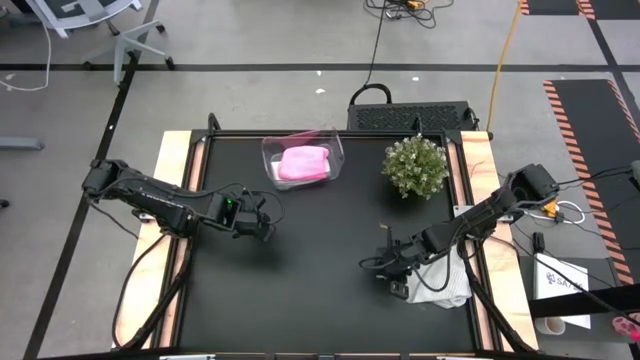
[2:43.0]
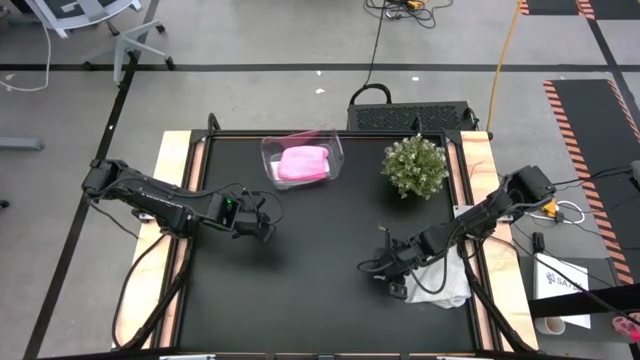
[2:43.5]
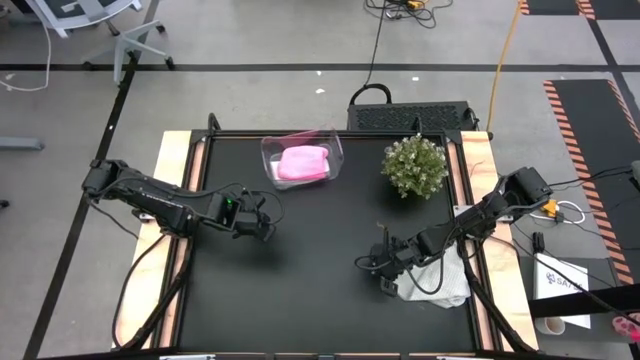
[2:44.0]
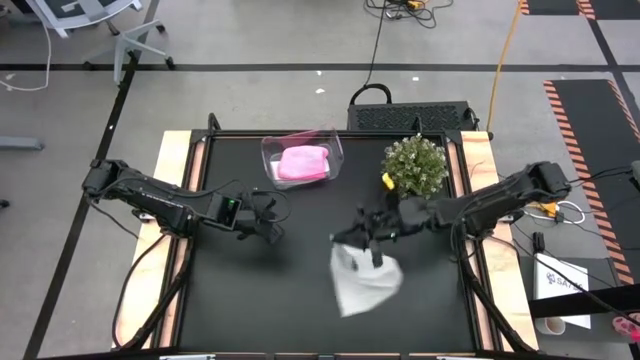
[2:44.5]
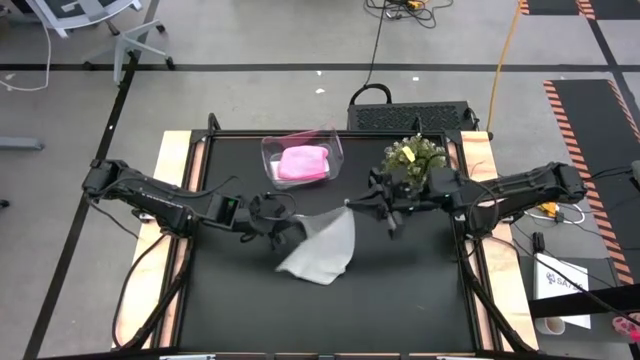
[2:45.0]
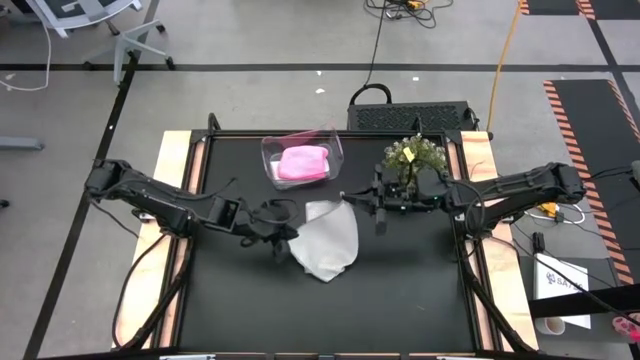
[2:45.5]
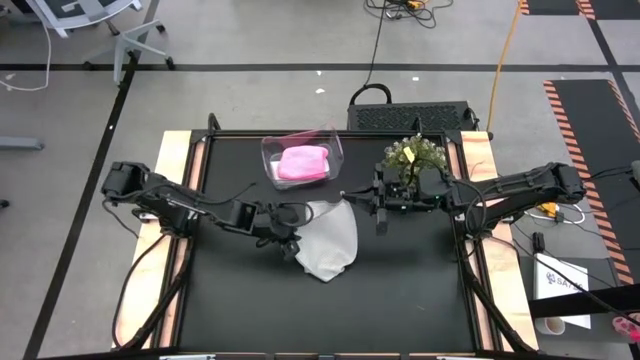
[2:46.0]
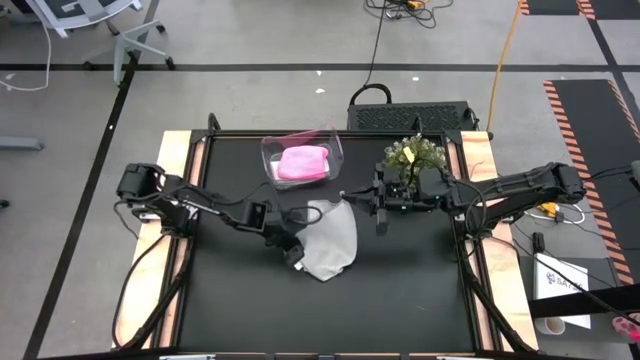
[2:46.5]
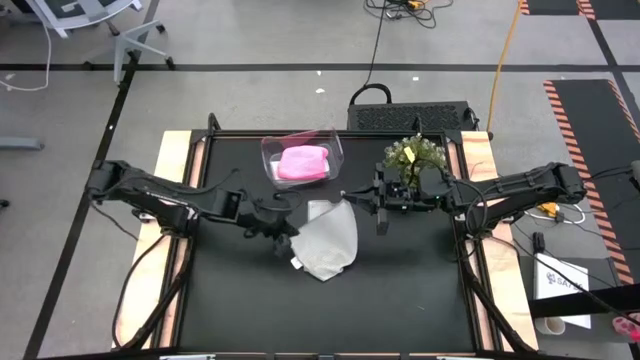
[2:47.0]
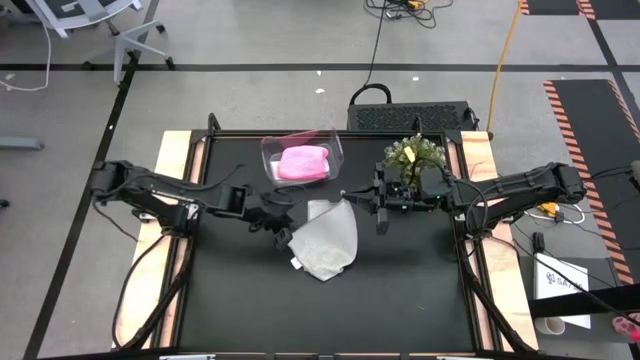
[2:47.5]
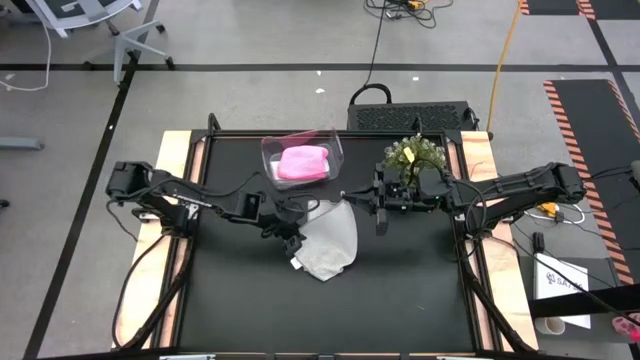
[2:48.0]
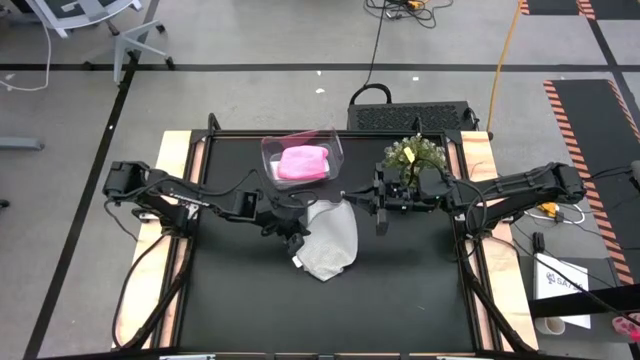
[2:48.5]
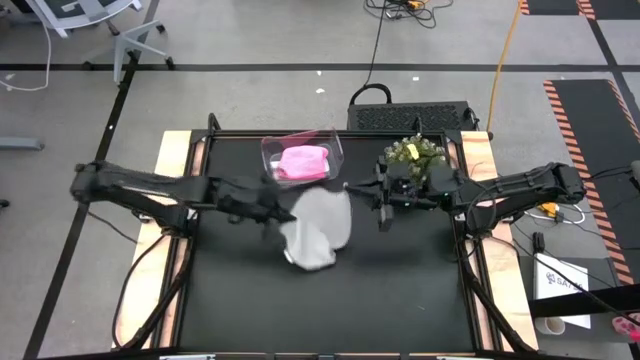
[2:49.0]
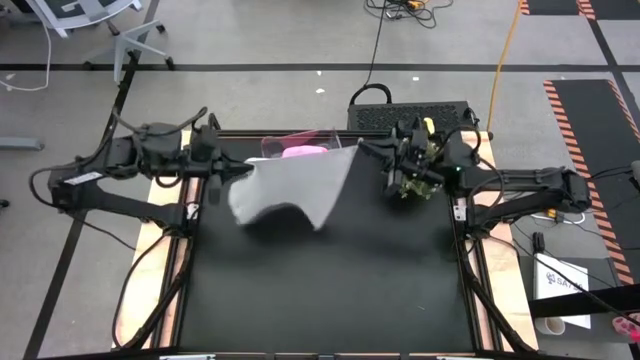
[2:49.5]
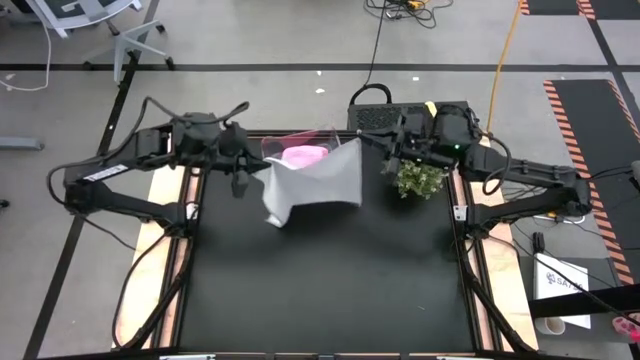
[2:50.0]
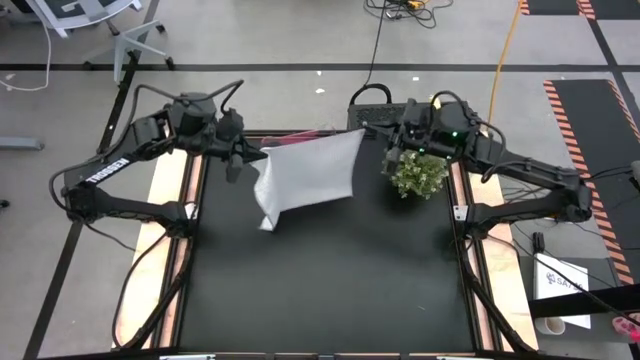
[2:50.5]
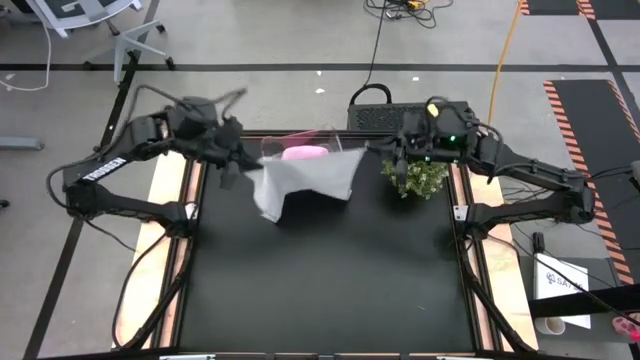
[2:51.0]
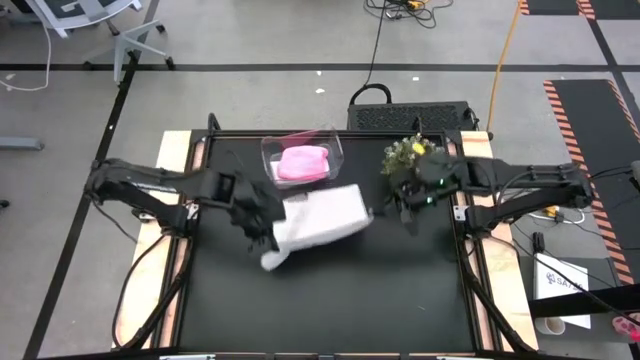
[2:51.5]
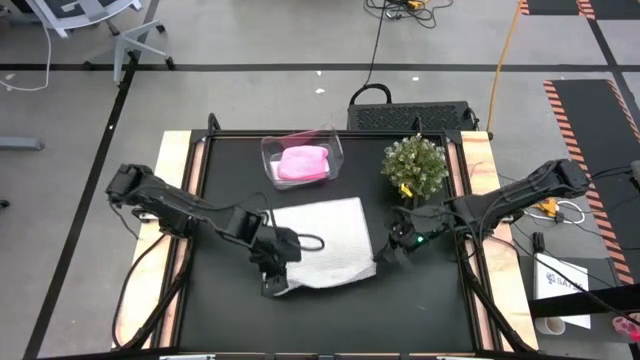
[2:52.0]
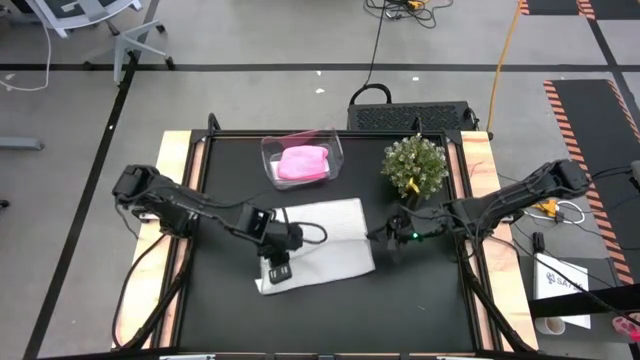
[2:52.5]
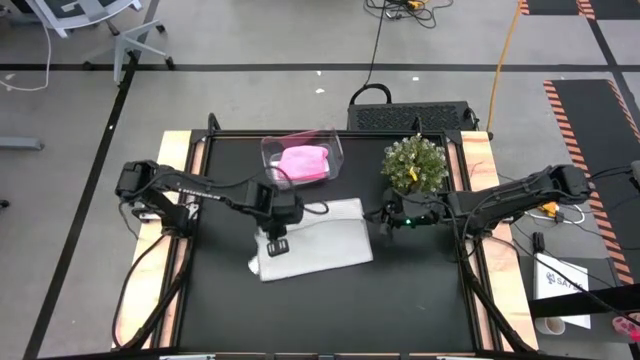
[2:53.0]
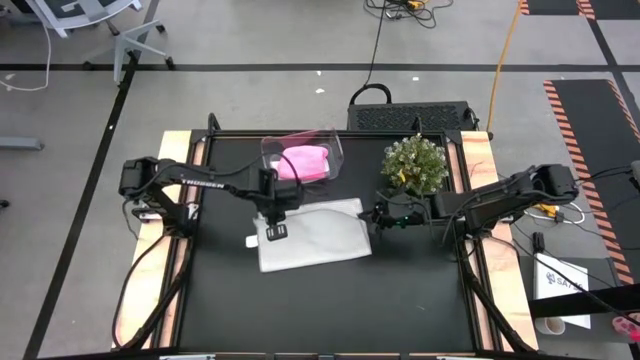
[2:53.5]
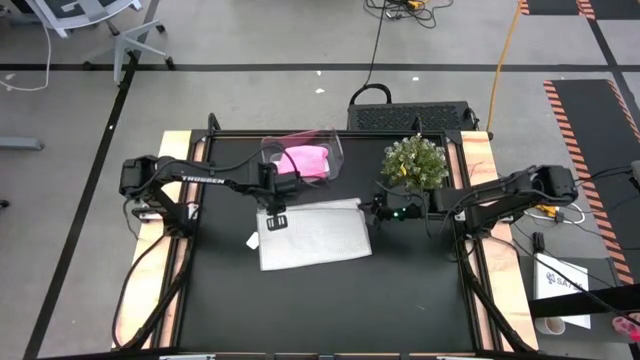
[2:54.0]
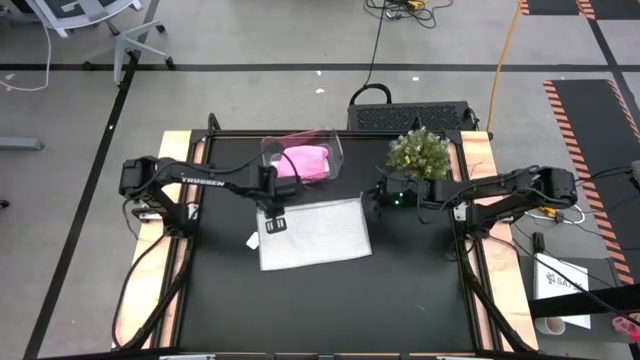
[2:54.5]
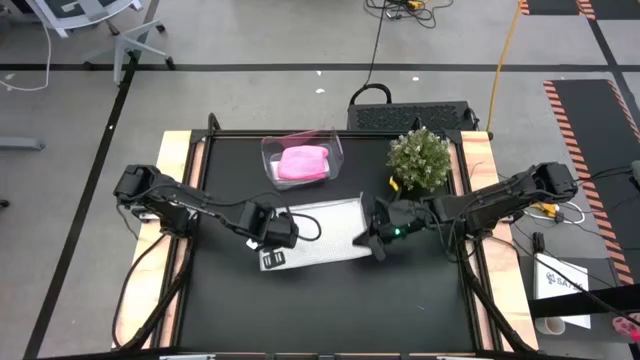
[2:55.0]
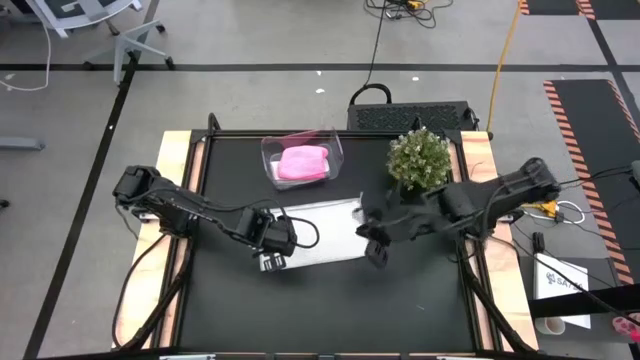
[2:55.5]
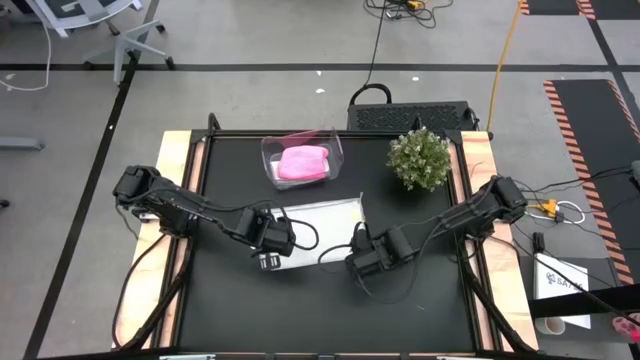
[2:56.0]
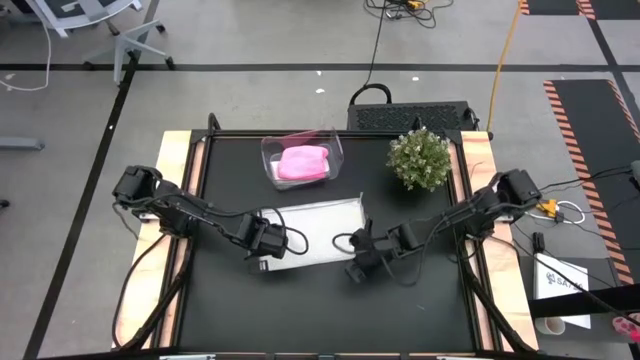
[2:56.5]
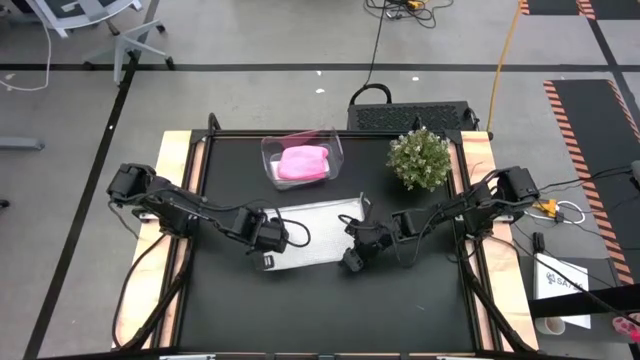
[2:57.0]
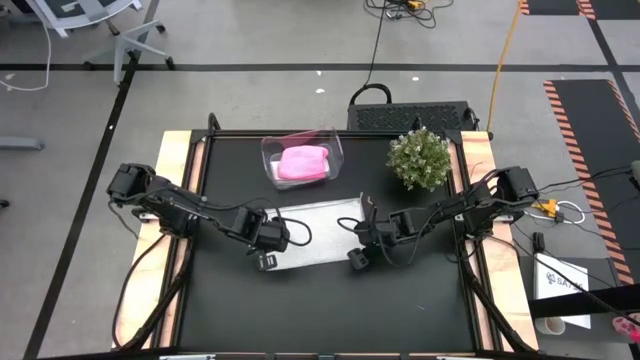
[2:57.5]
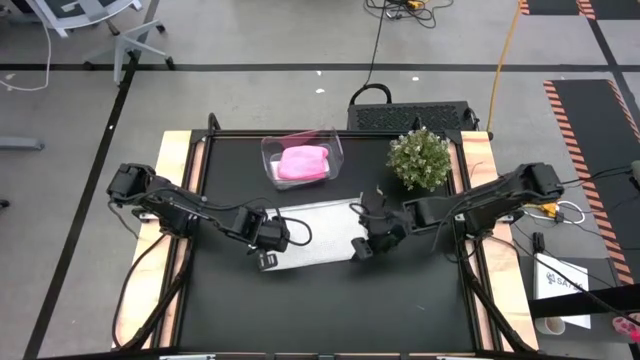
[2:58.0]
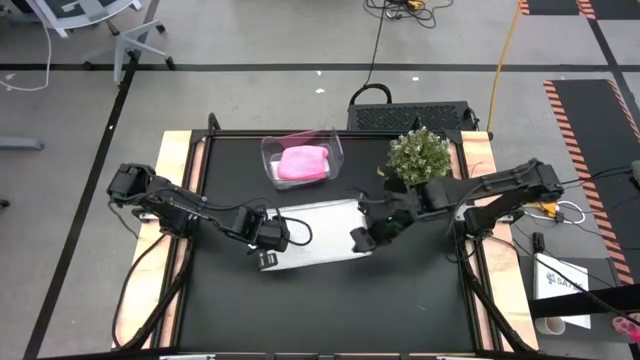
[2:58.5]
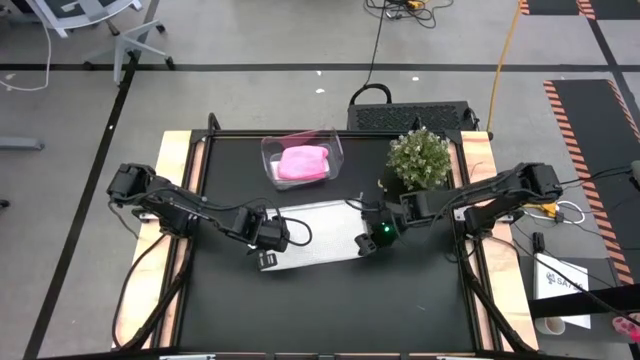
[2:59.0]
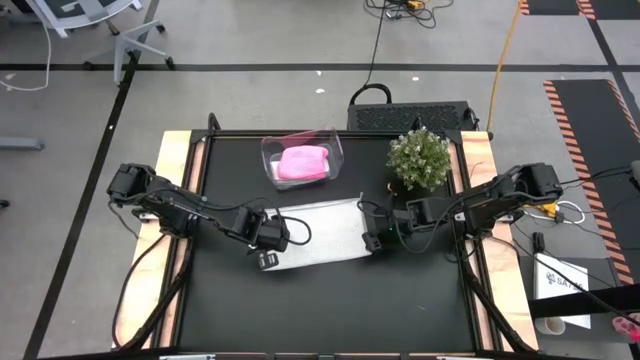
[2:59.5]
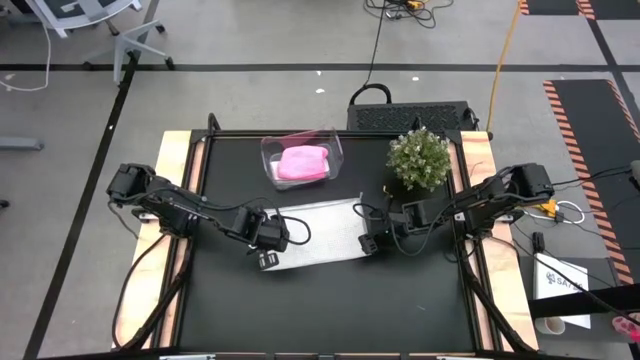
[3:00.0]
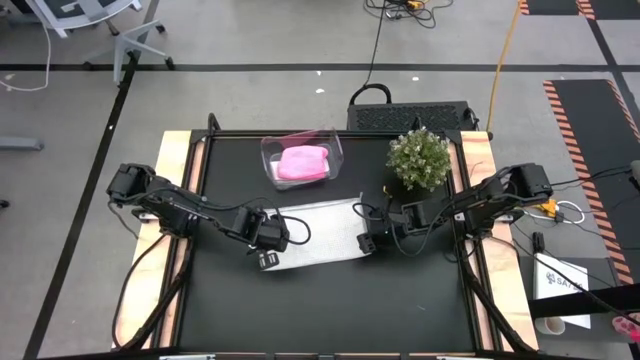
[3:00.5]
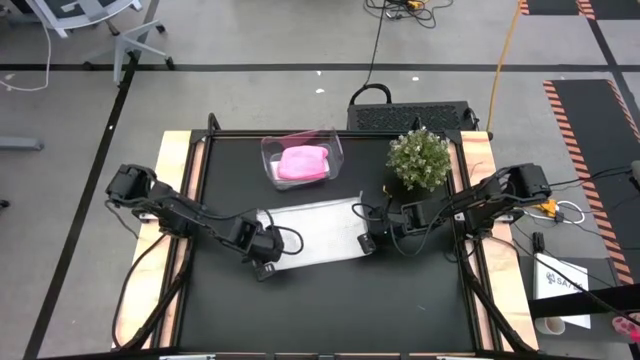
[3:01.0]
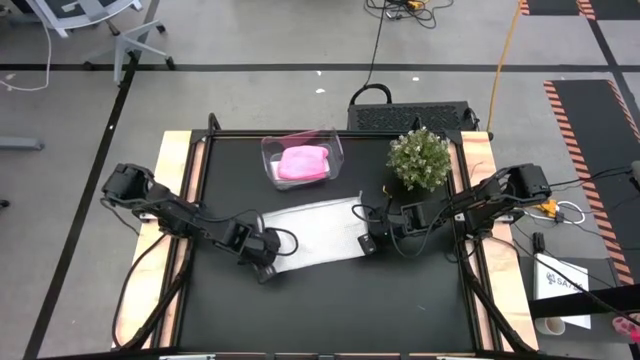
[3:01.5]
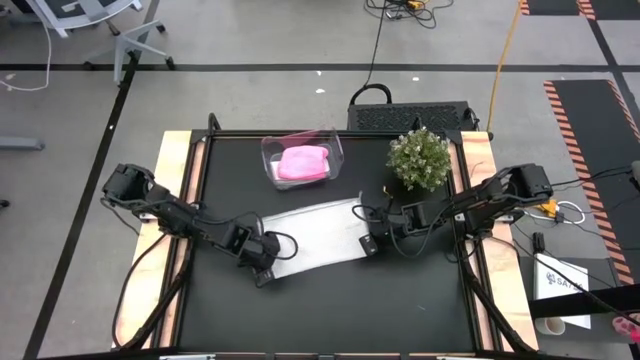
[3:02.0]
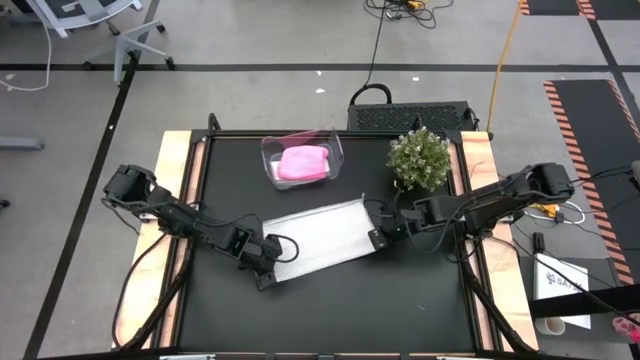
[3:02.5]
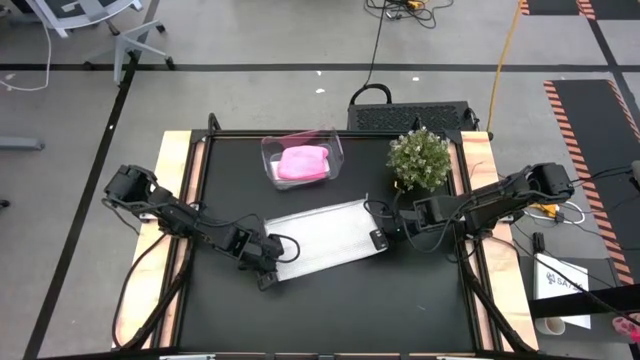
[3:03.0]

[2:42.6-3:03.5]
Task: Fold microfiber towels
Fold the gray towel

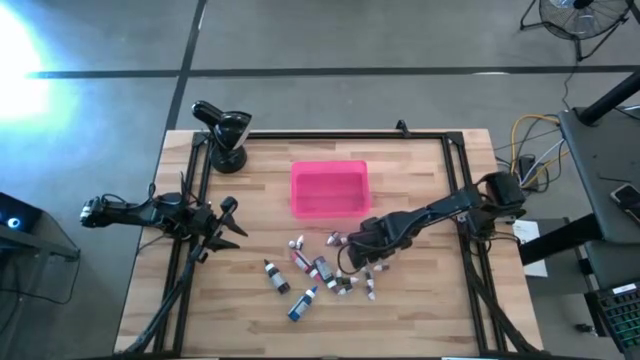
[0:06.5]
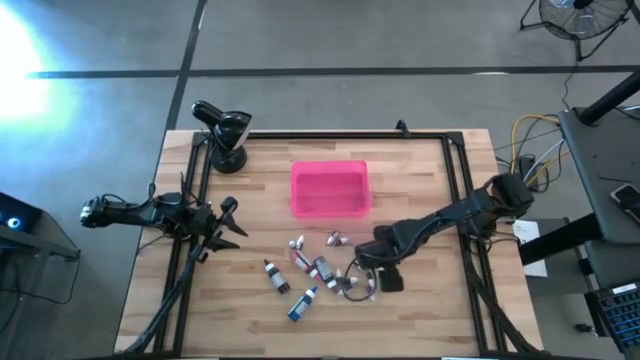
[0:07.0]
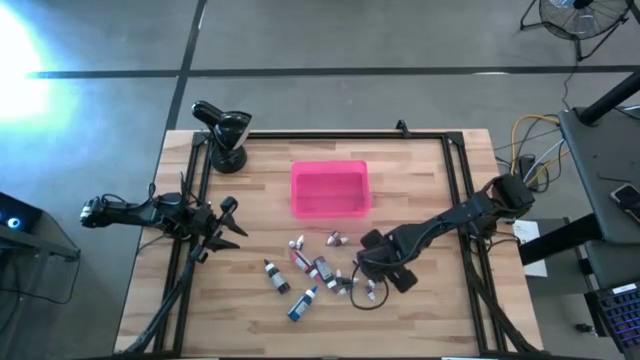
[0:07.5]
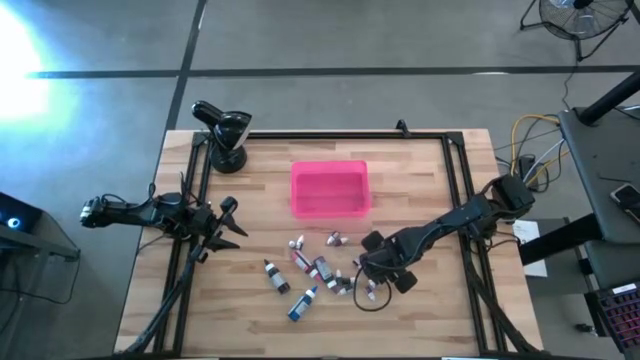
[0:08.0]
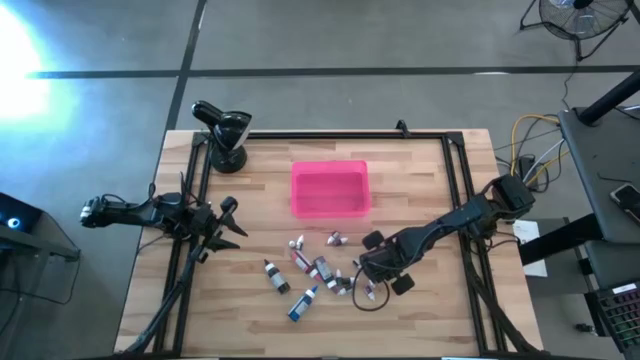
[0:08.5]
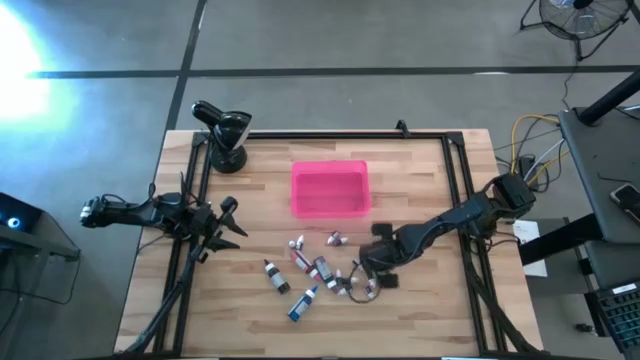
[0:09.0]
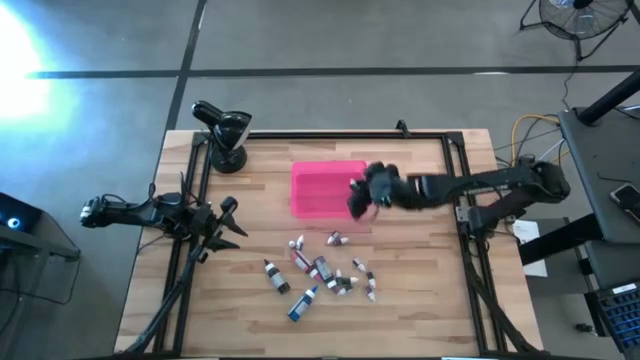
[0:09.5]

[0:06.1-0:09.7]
Task: Pick & Place food coloring
Put the brown food coloring bottle into the pink bin
